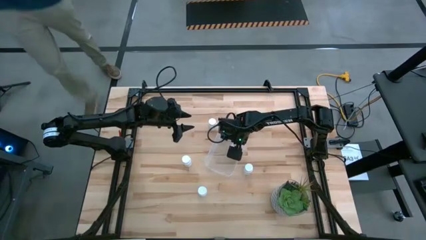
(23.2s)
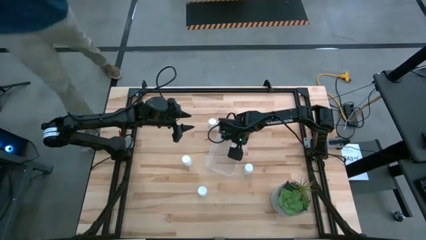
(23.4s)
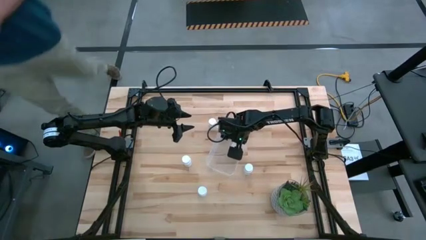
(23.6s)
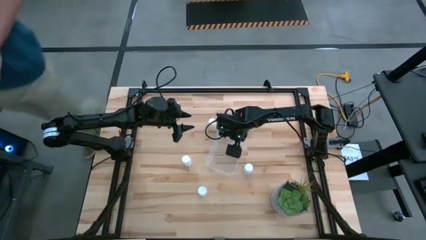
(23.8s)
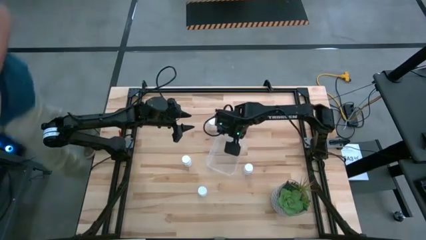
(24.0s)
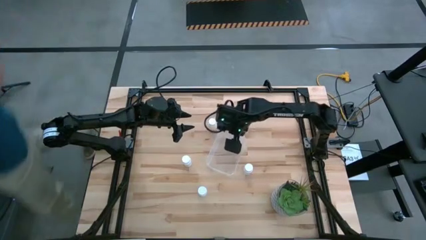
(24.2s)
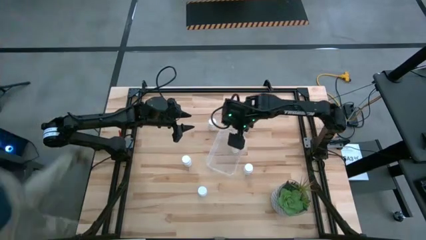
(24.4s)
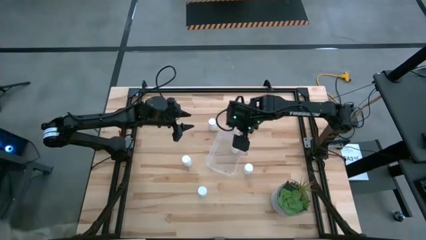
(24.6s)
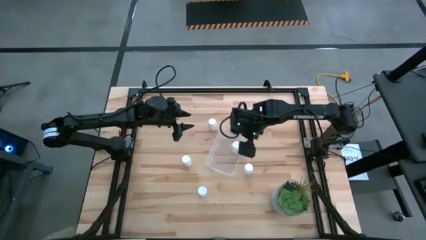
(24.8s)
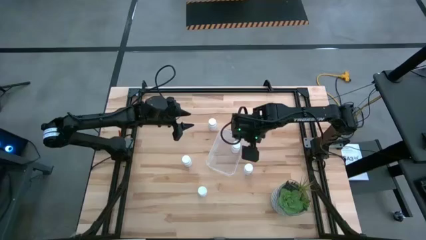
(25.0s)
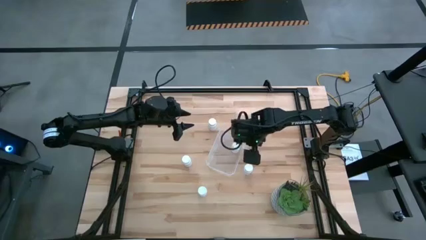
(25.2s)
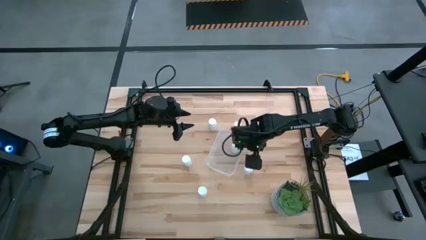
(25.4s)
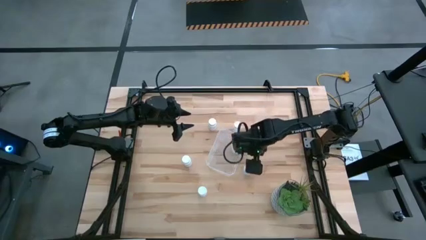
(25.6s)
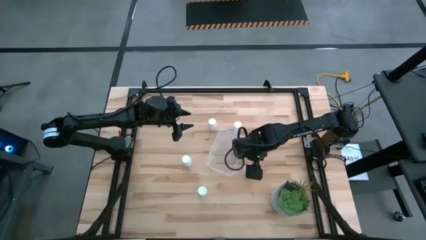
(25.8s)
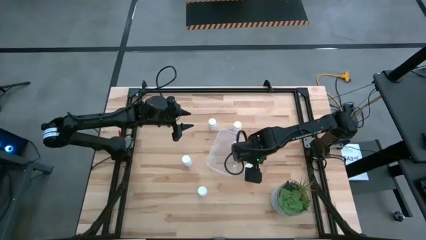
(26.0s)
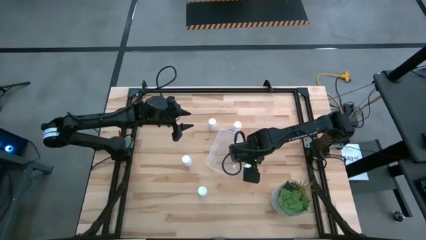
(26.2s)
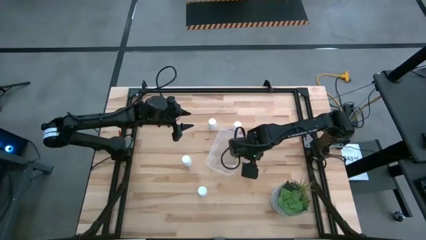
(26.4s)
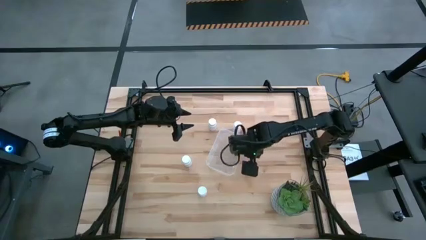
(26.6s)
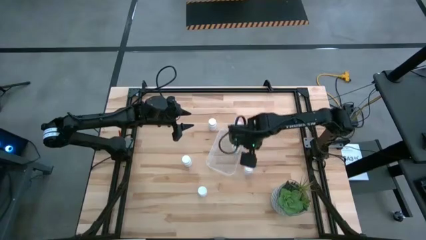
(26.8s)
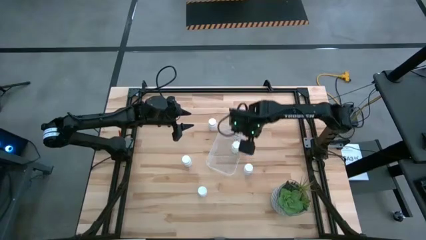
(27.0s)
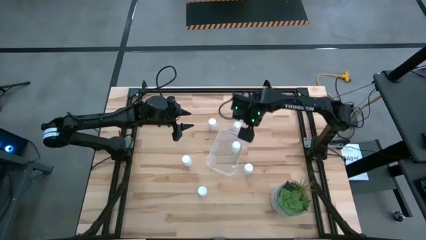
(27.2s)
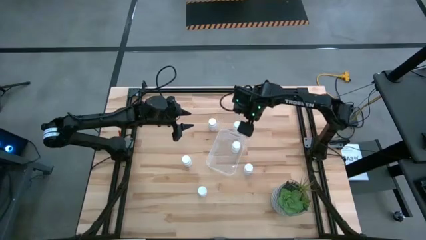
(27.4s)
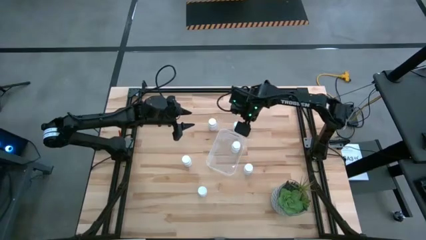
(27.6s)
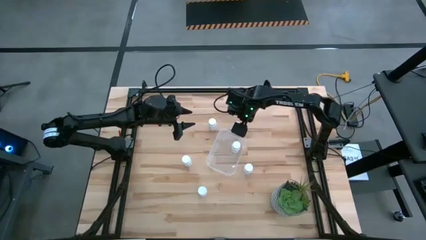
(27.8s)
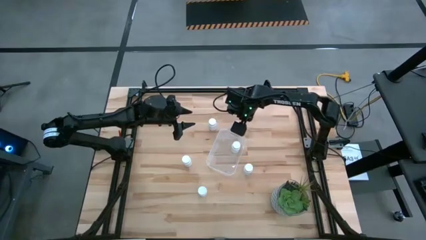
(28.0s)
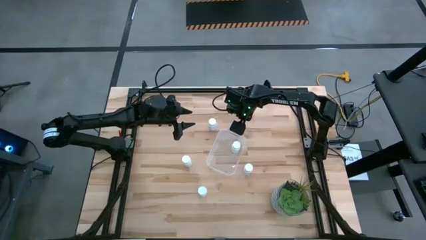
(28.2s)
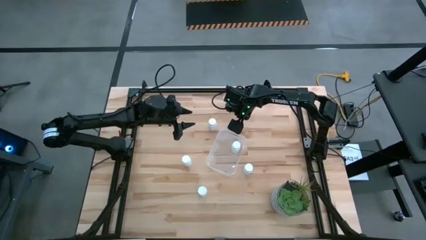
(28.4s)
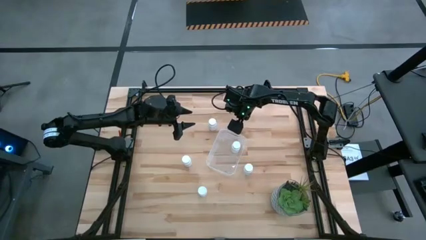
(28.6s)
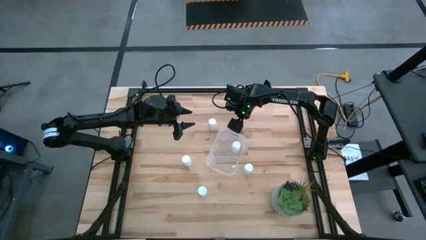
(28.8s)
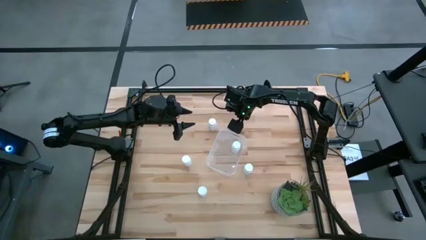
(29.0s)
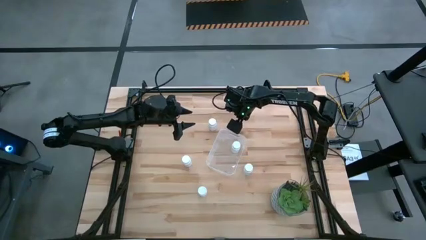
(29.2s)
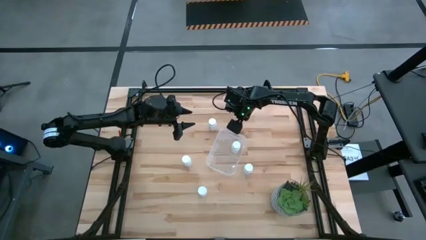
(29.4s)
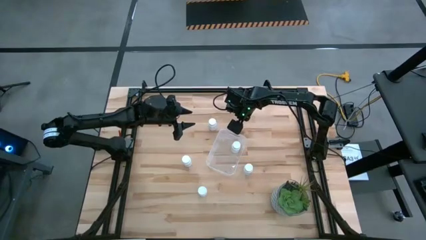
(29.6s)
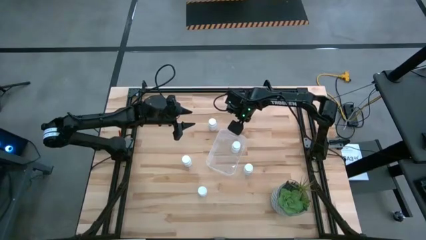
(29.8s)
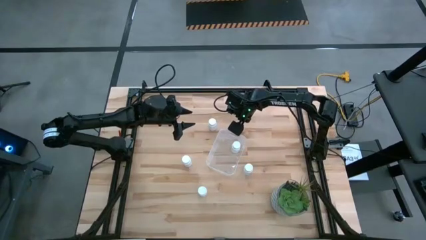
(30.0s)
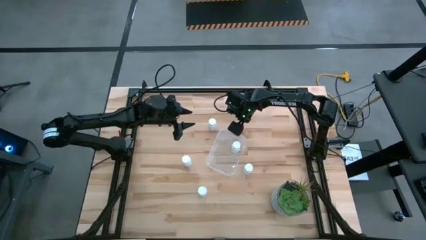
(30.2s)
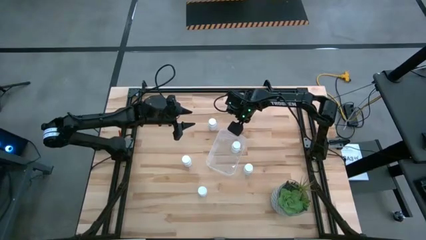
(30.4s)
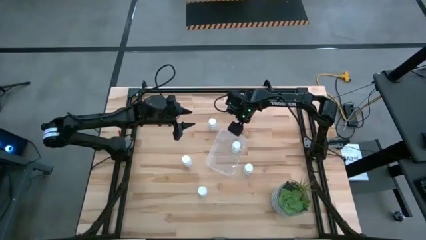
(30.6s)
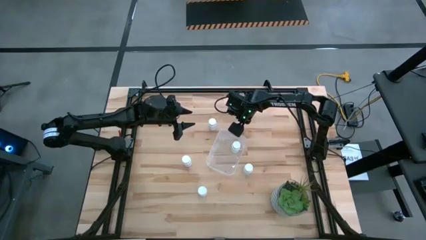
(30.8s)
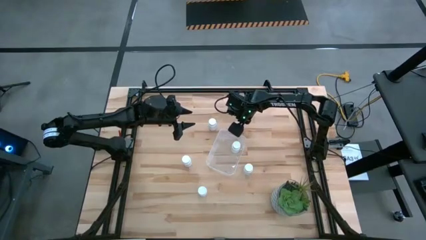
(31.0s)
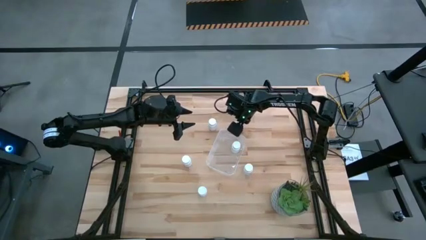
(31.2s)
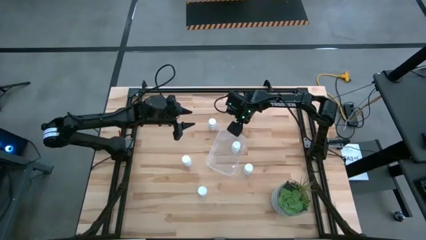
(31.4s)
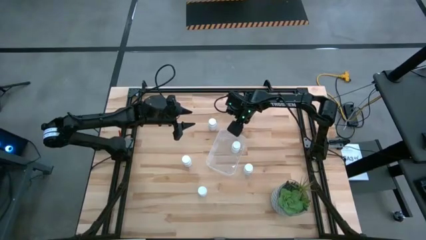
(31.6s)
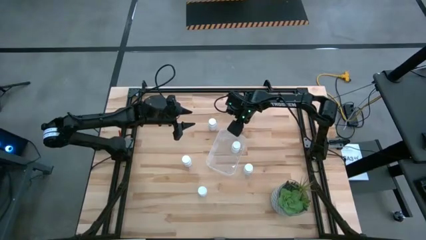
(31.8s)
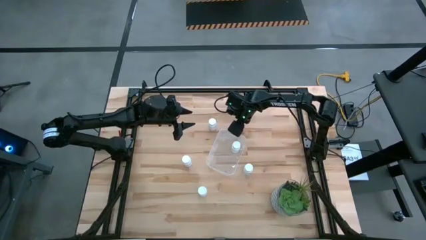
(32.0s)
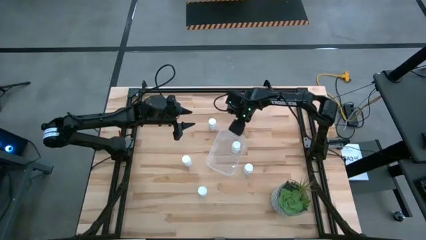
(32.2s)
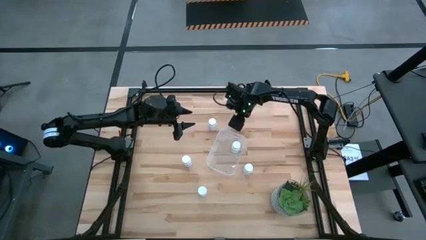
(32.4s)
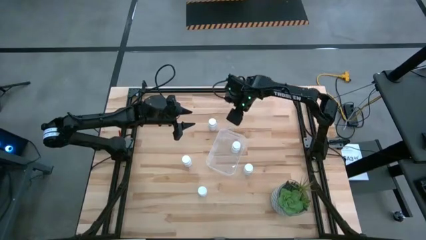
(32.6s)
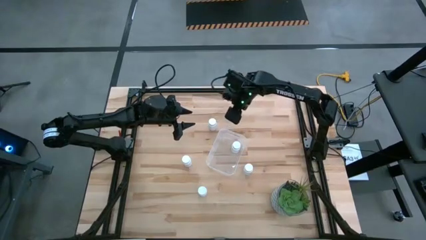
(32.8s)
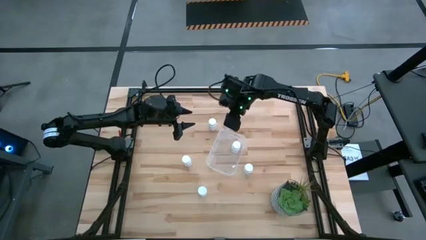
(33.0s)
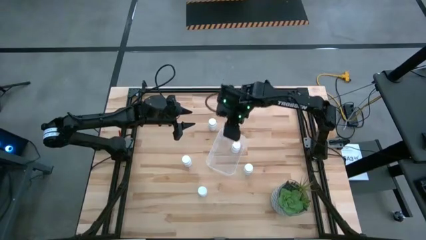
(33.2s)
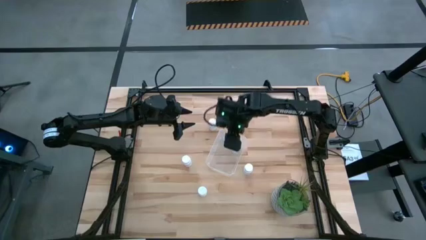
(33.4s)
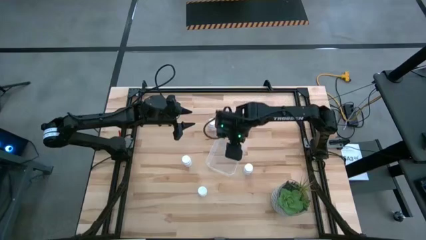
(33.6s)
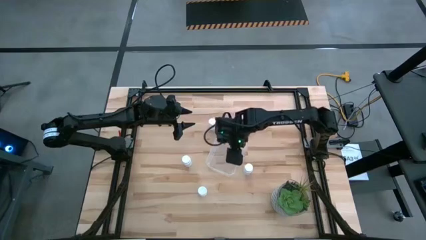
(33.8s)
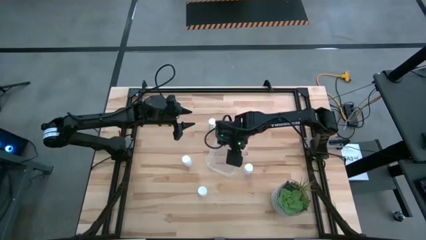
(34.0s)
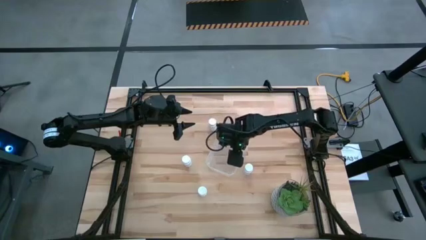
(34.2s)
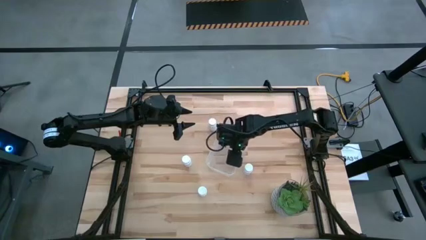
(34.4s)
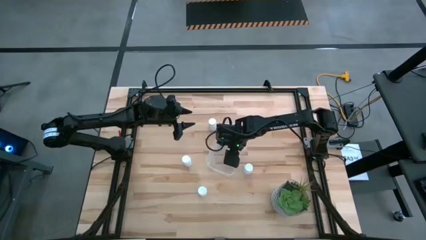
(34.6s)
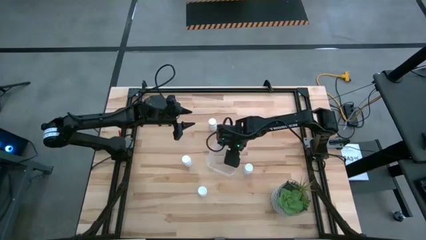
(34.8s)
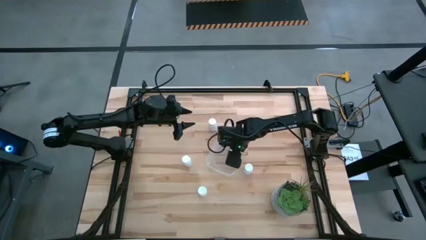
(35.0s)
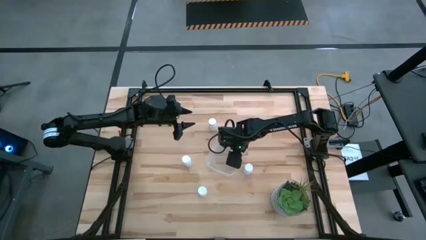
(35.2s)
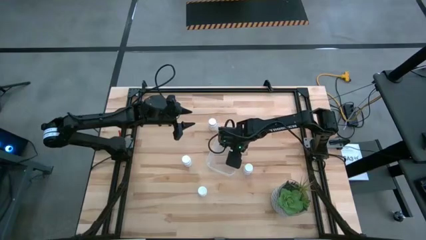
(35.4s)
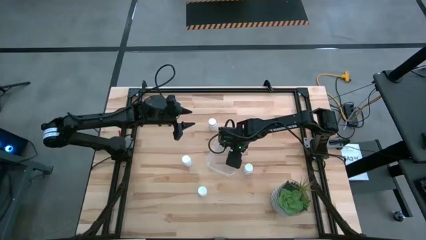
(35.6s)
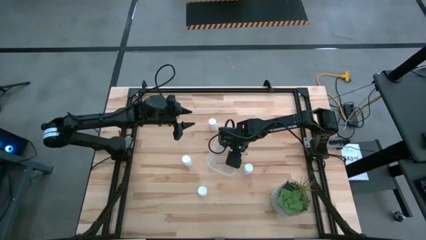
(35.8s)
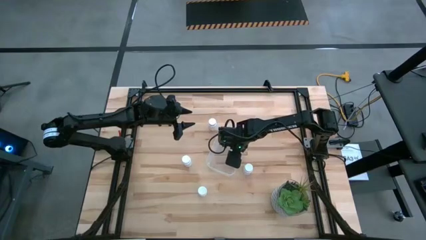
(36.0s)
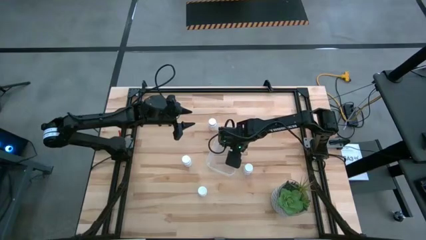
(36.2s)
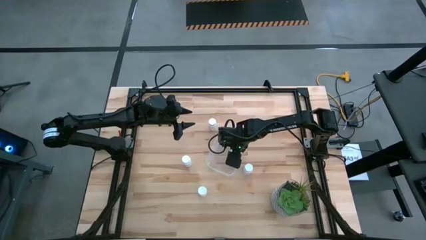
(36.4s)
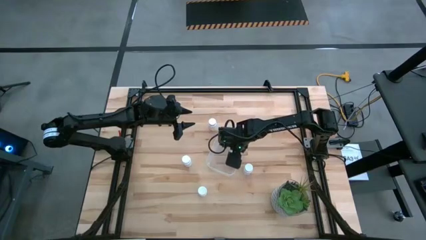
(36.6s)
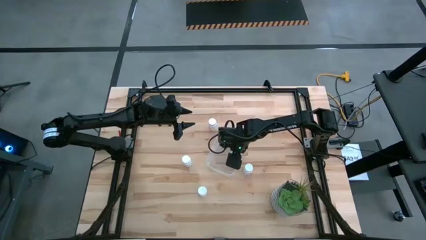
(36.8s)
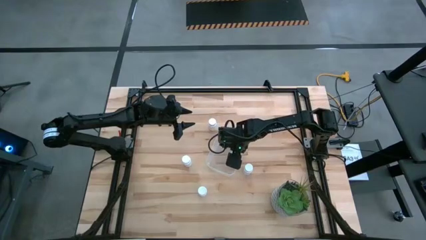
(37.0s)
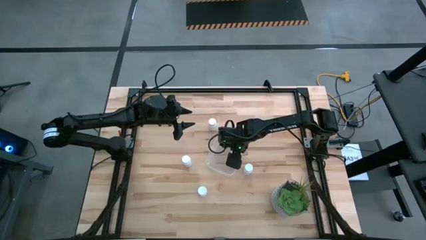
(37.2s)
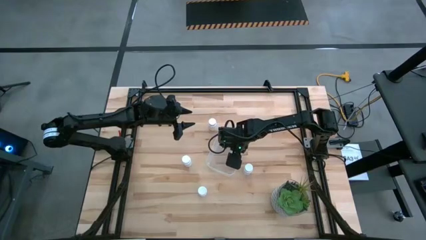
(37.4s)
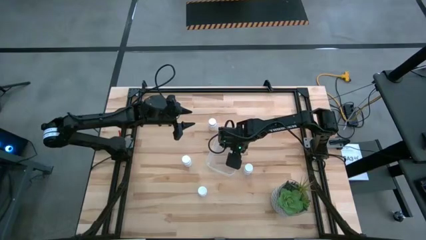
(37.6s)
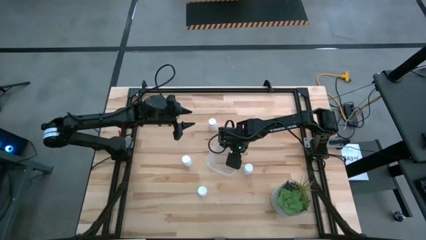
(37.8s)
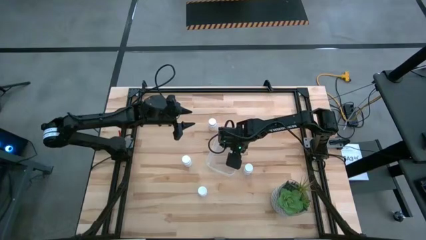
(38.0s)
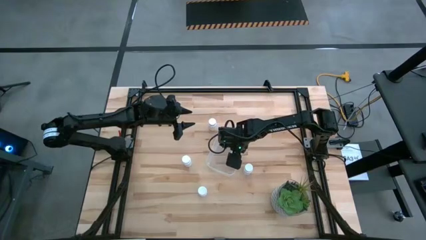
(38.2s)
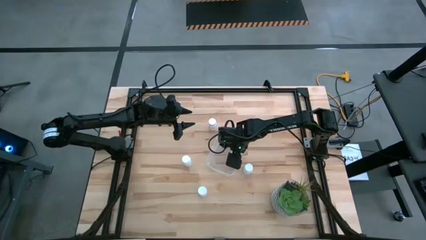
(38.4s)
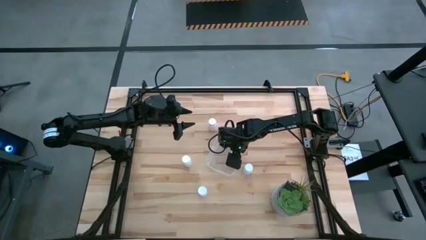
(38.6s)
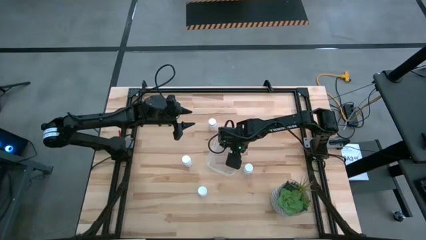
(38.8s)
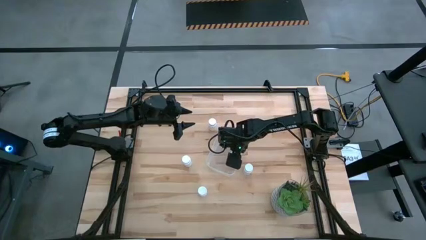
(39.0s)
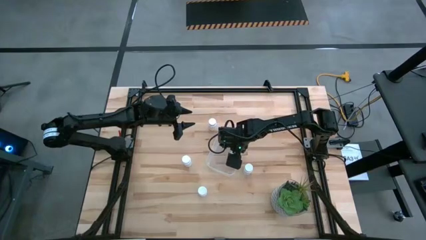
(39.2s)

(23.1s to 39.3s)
Task: Pick and place pill bottles into a basket
Put the medicine bottle into the transparent bin

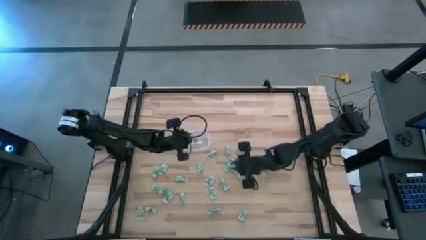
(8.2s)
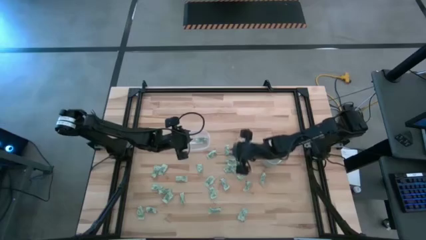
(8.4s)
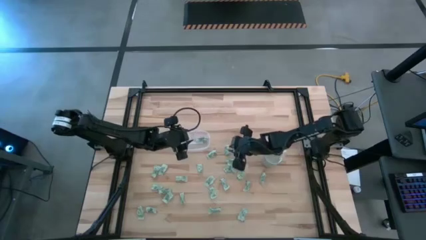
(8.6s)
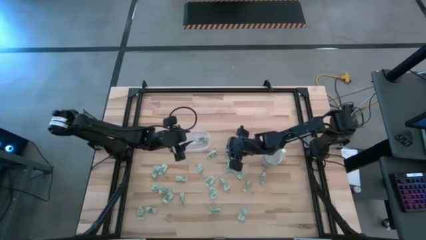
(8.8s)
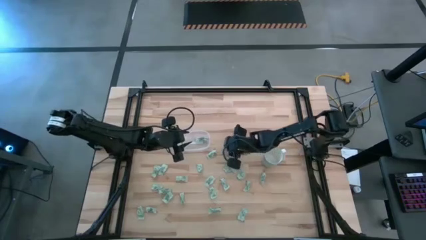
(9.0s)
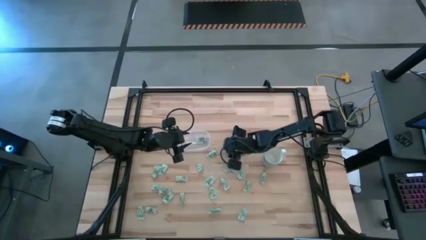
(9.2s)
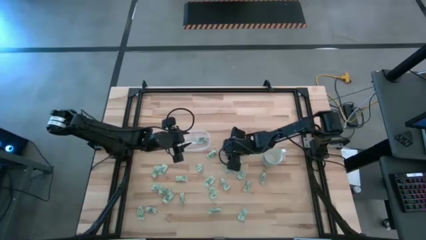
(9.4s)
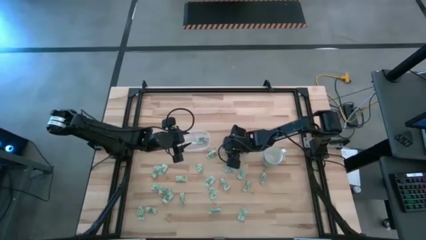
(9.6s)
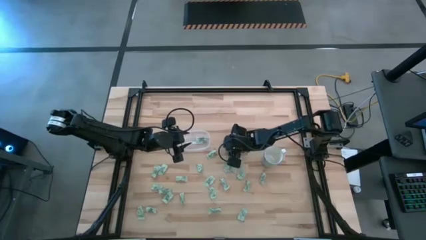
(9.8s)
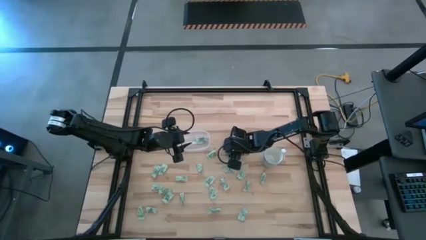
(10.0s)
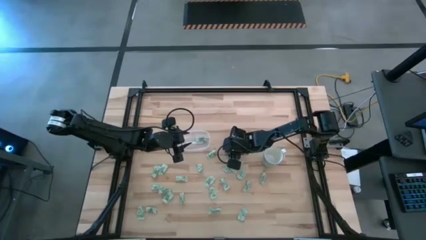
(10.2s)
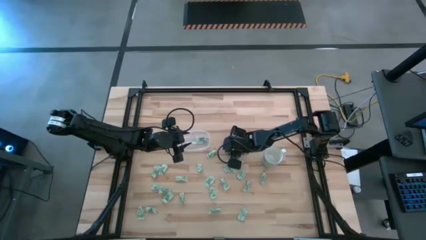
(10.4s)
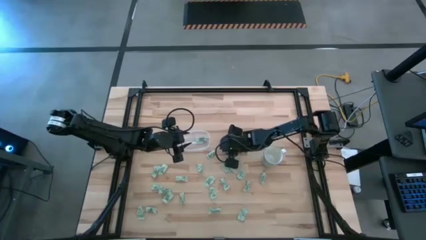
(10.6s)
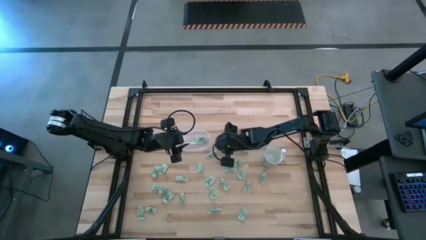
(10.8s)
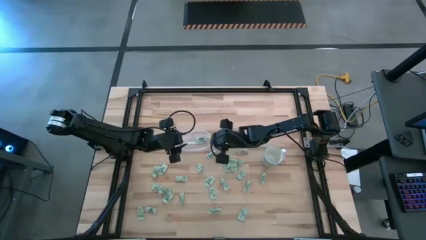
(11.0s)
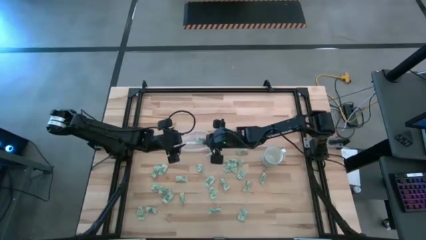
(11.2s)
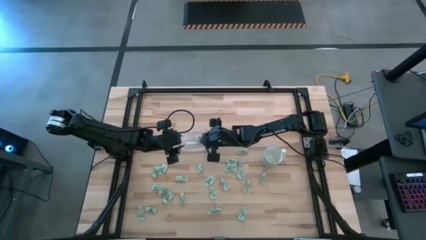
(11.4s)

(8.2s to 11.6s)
Task: Pick and place Stevia / Truvia into bins
Put the stevia packet into the transparent bin
